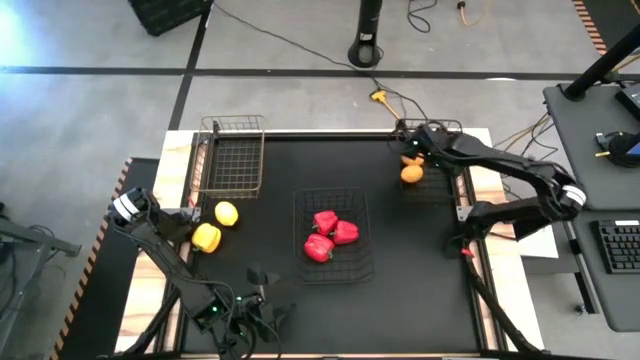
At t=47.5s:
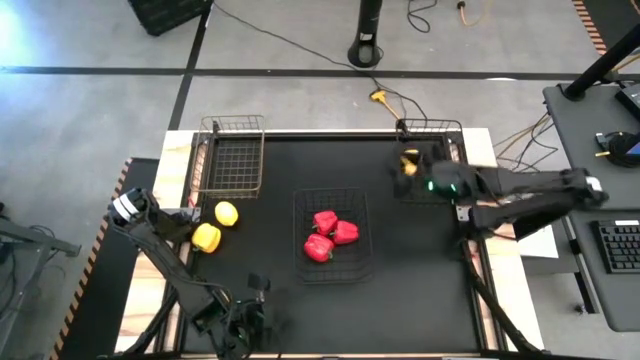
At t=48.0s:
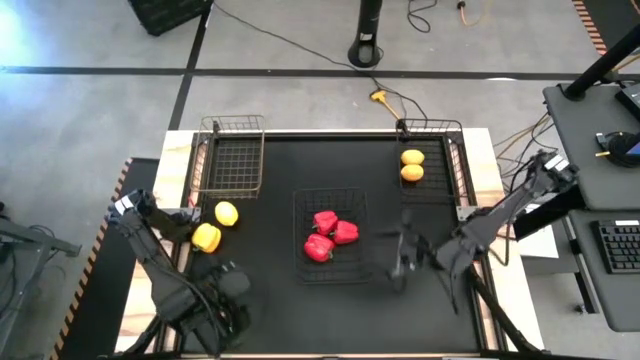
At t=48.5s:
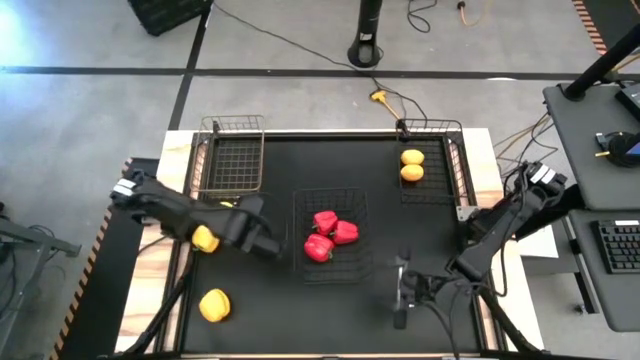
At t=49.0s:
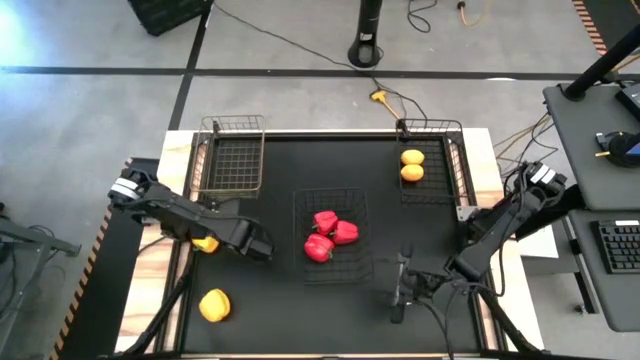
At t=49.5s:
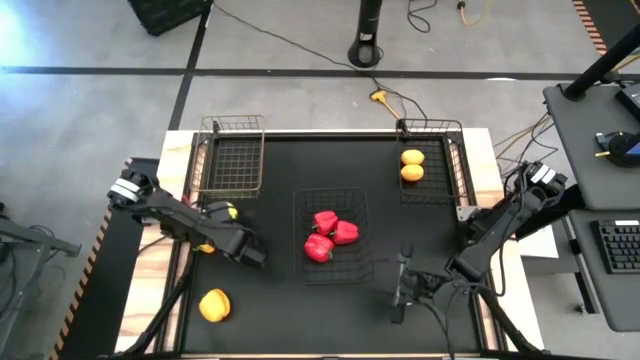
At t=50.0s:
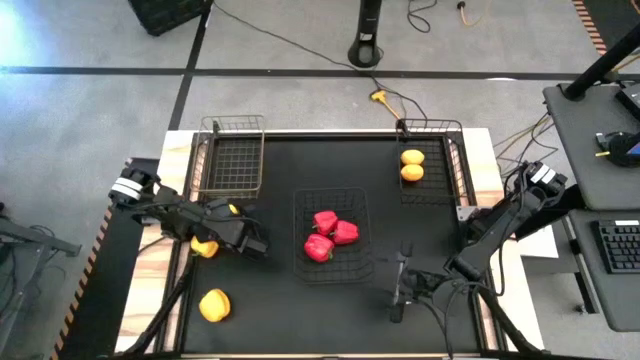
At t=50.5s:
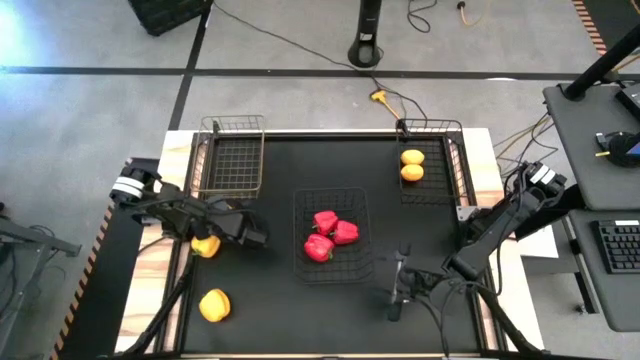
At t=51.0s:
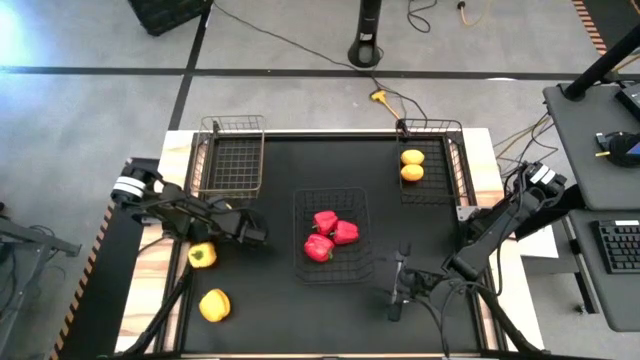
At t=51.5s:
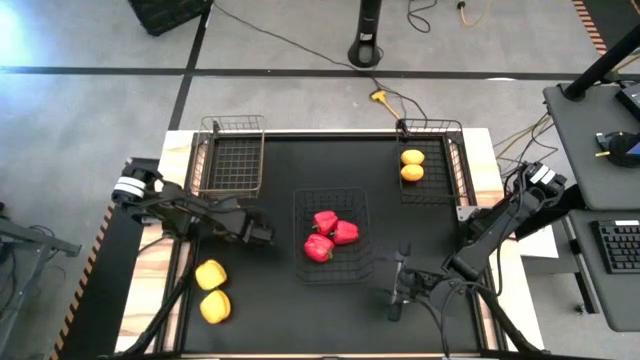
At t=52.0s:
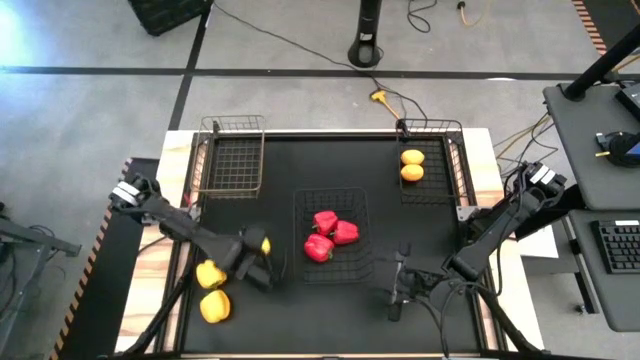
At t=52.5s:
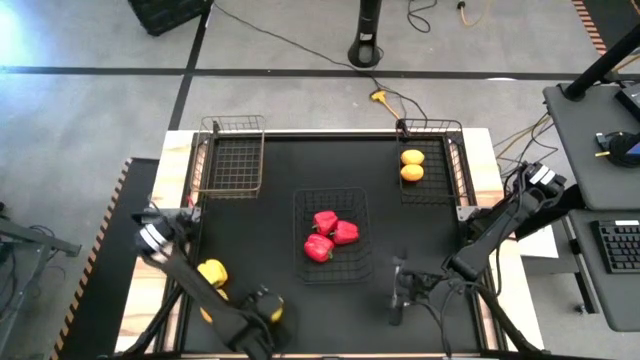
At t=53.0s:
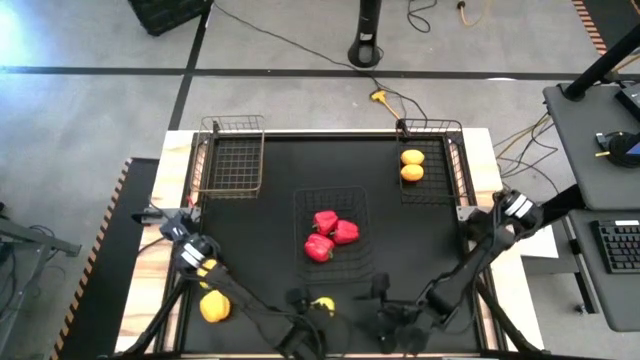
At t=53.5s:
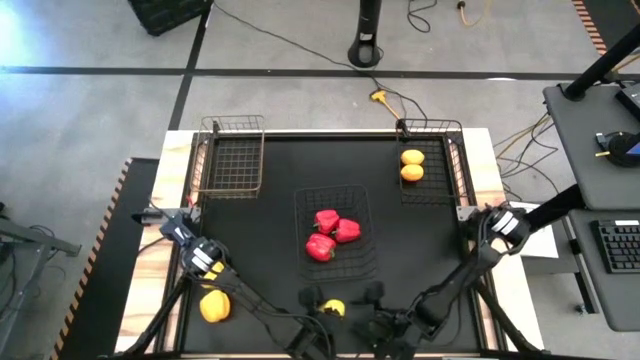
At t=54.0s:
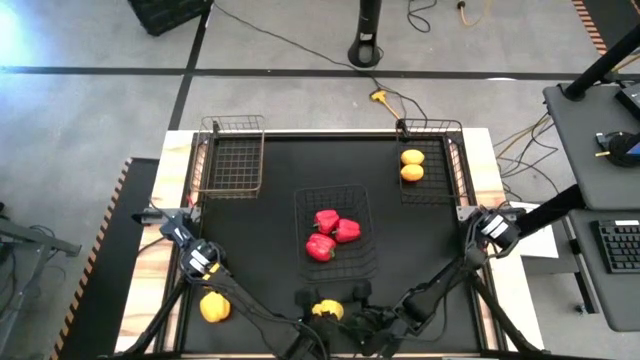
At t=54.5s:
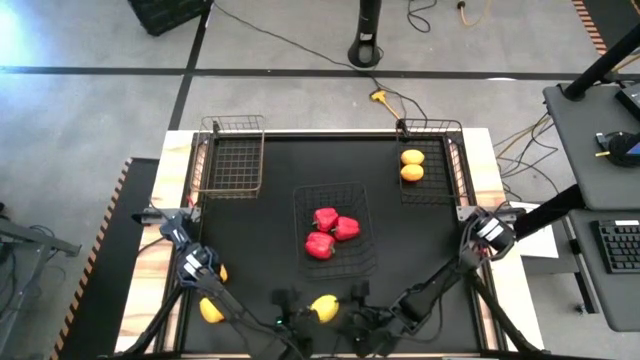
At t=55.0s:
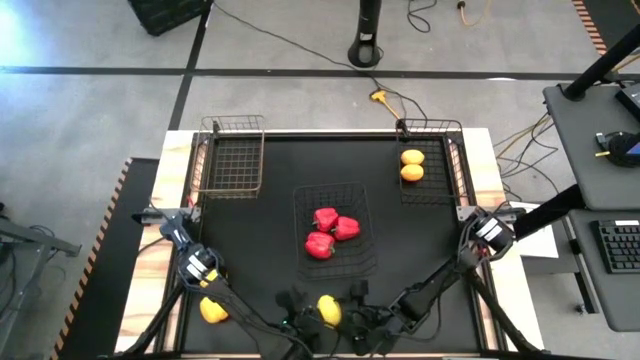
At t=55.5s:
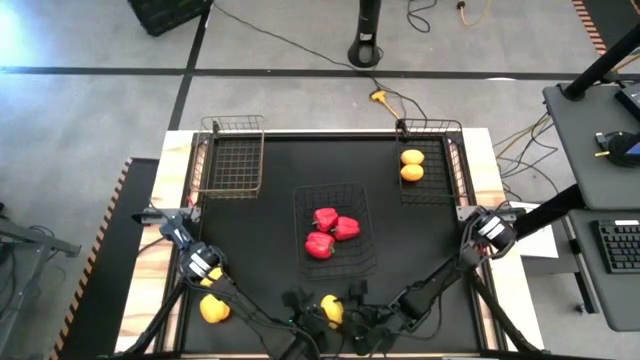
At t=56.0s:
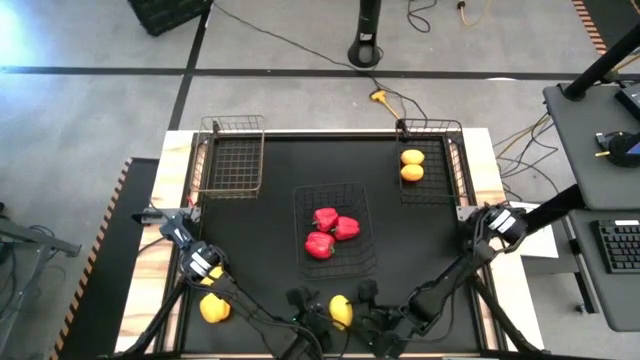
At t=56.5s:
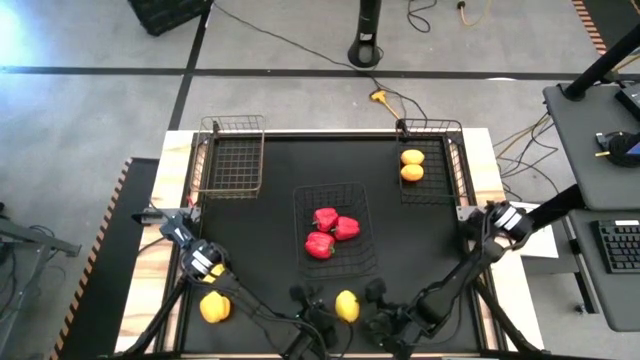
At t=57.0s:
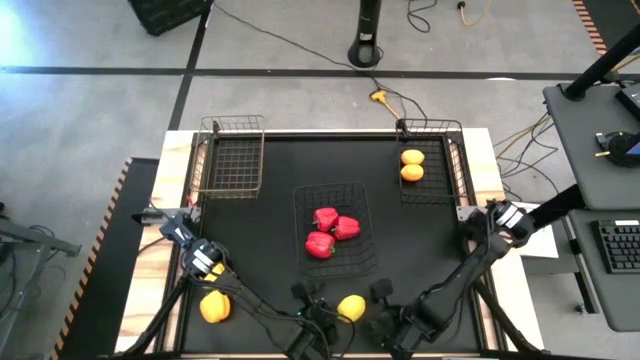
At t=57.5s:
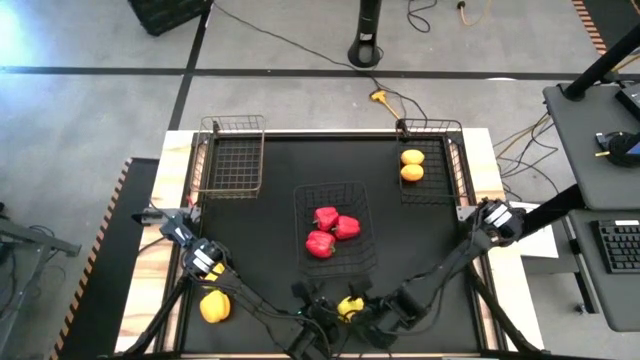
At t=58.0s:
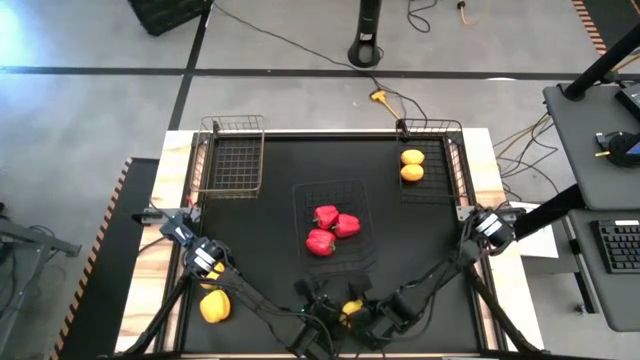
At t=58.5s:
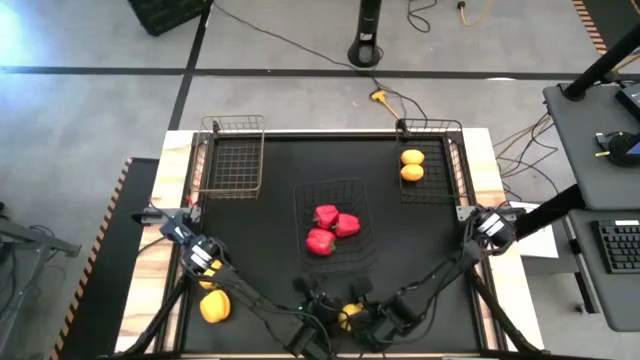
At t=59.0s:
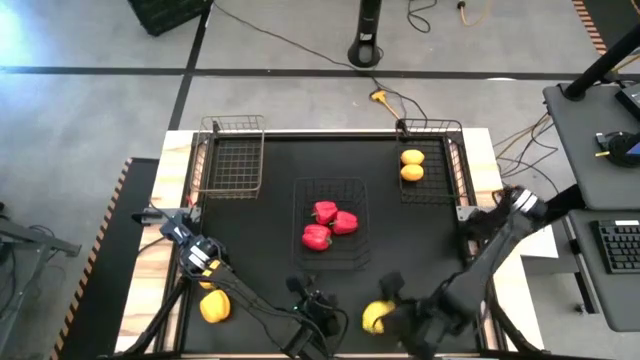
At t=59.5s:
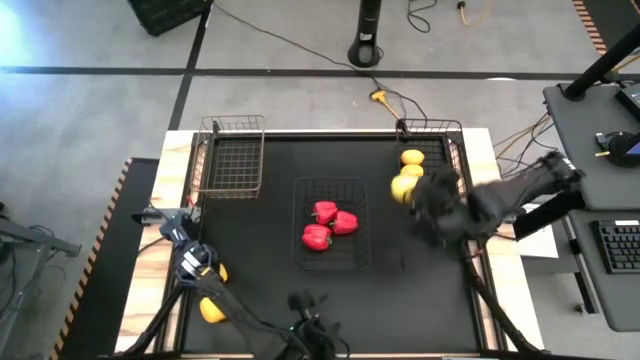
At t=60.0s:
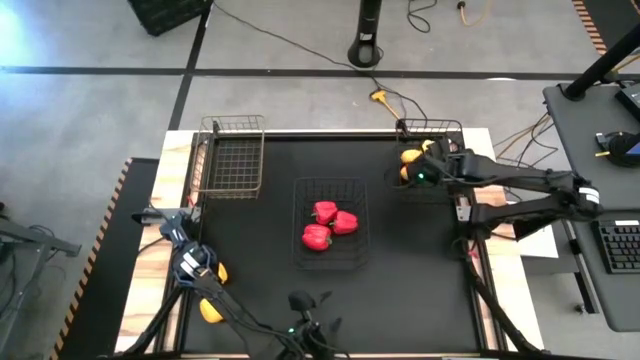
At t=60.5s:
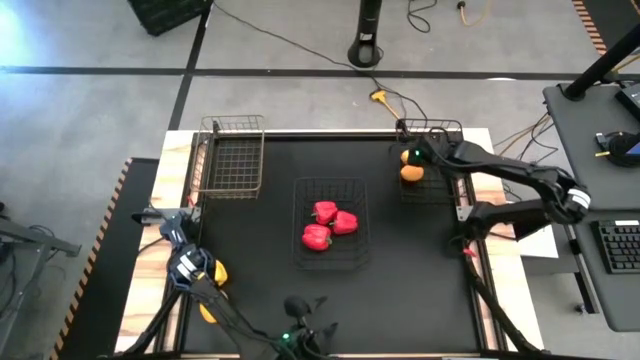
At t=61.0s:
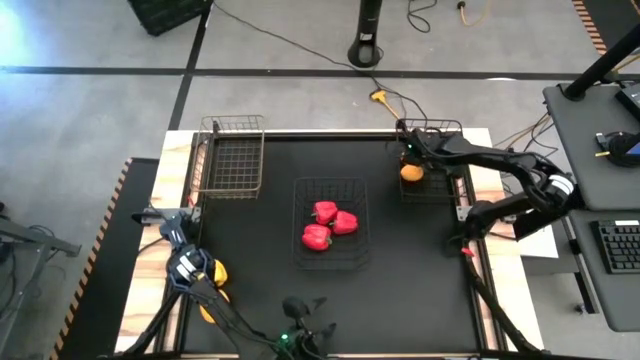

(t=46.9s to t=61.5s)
Task: Sort produce into baskets
Put the lemon into the right wire basket

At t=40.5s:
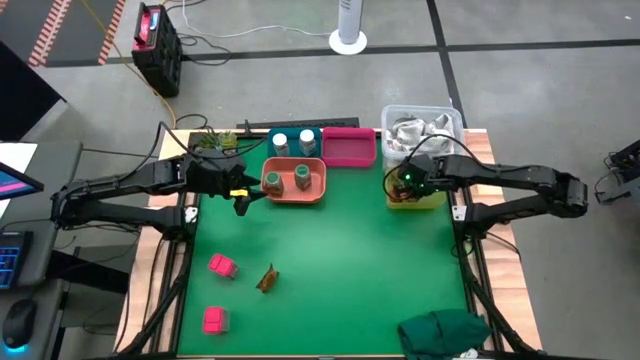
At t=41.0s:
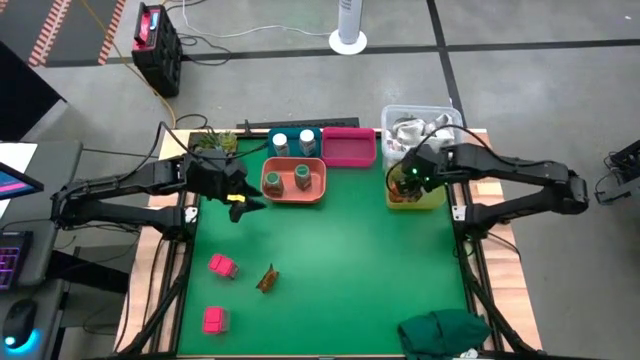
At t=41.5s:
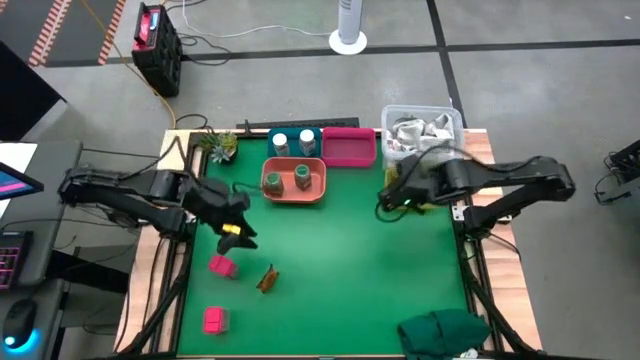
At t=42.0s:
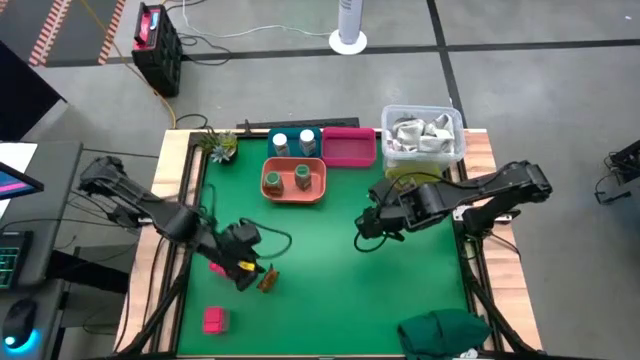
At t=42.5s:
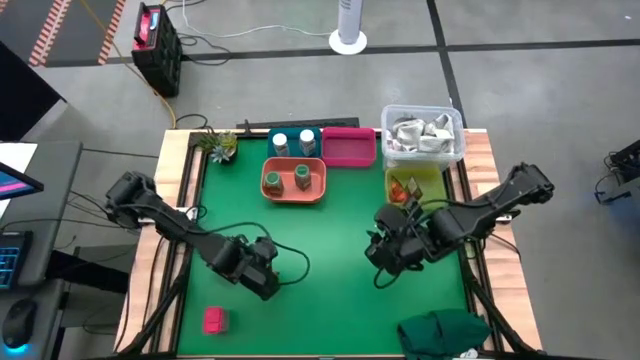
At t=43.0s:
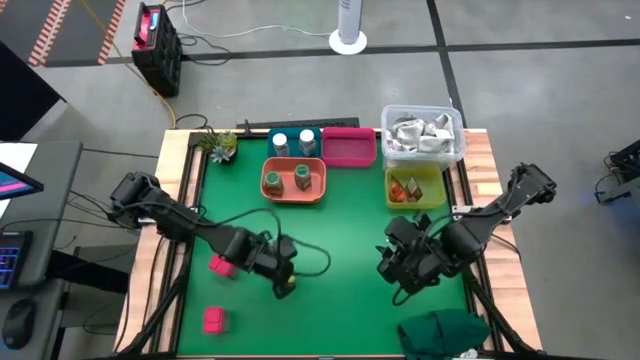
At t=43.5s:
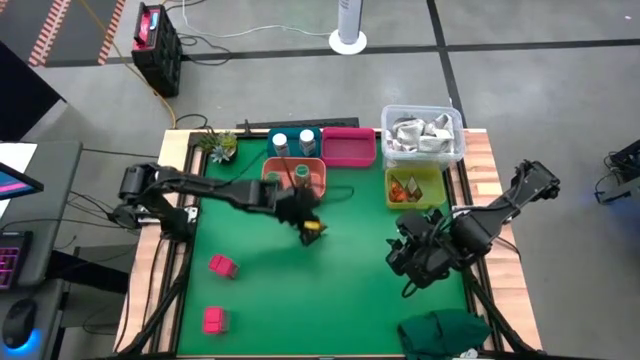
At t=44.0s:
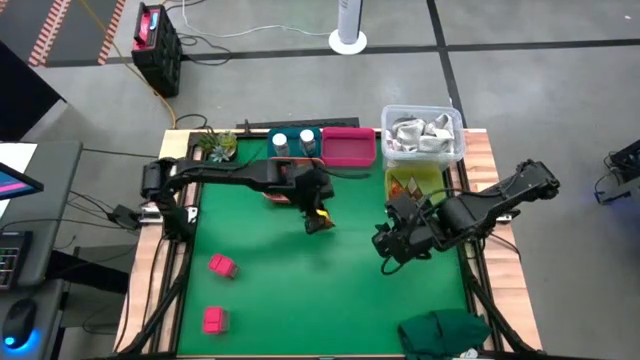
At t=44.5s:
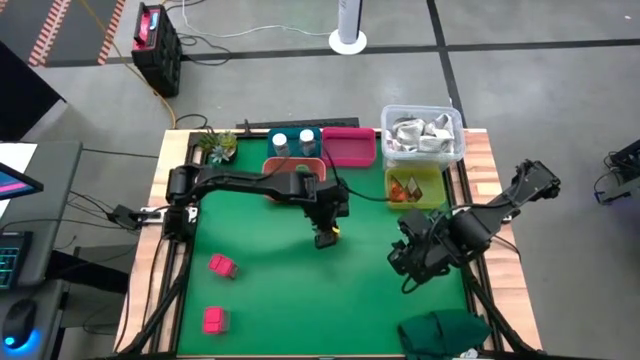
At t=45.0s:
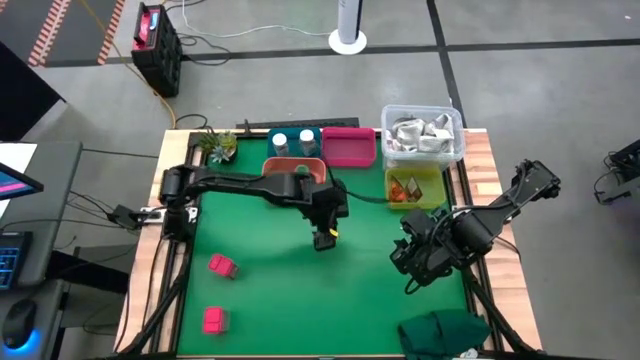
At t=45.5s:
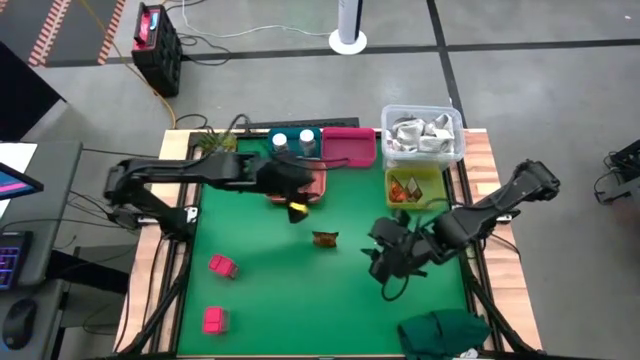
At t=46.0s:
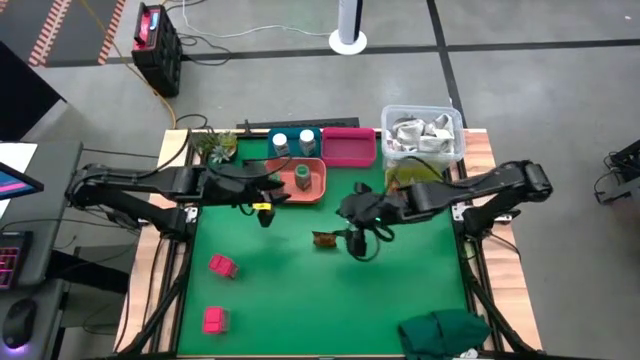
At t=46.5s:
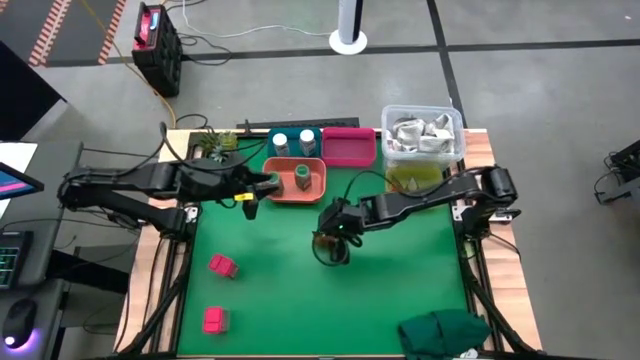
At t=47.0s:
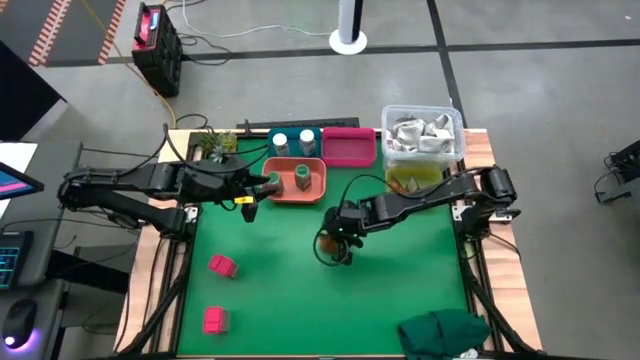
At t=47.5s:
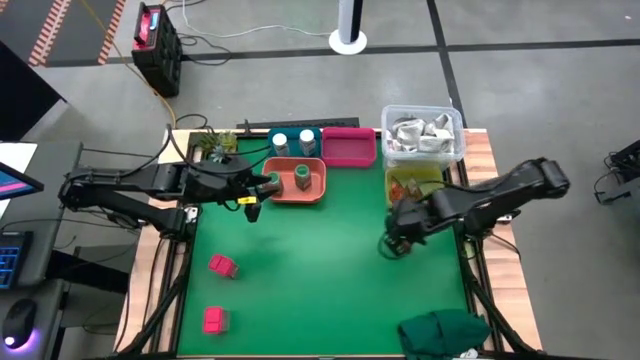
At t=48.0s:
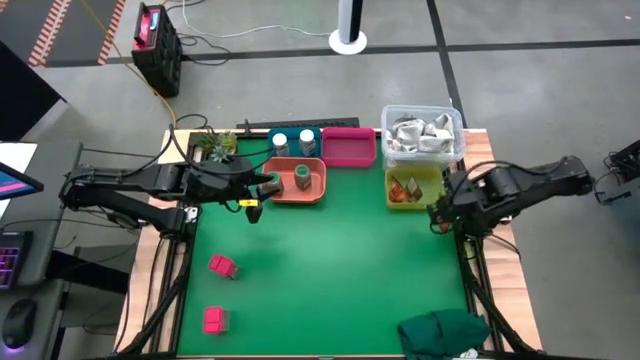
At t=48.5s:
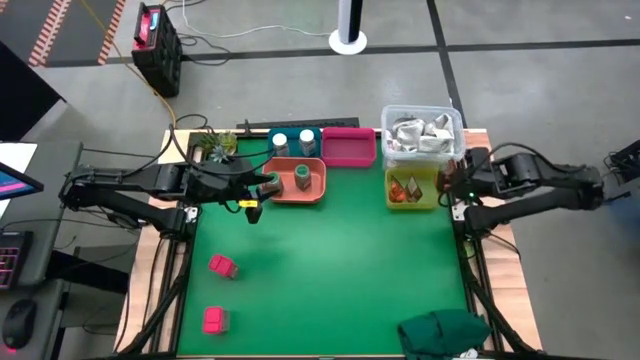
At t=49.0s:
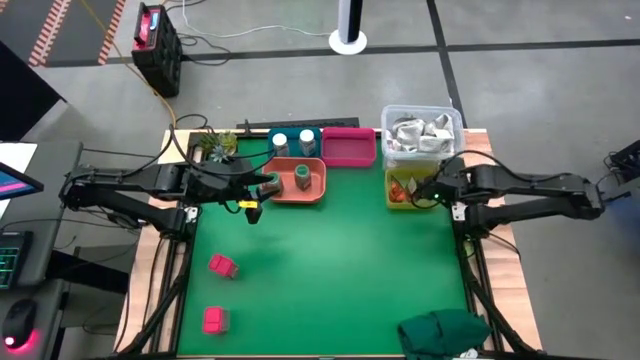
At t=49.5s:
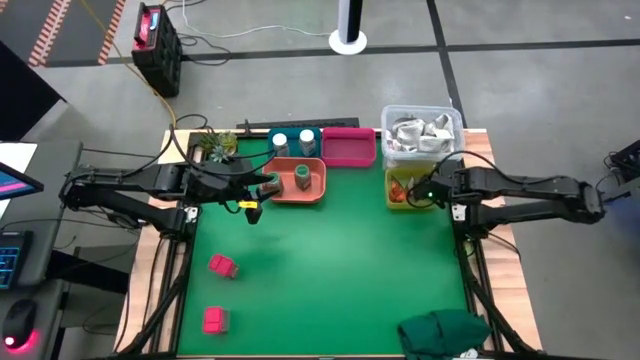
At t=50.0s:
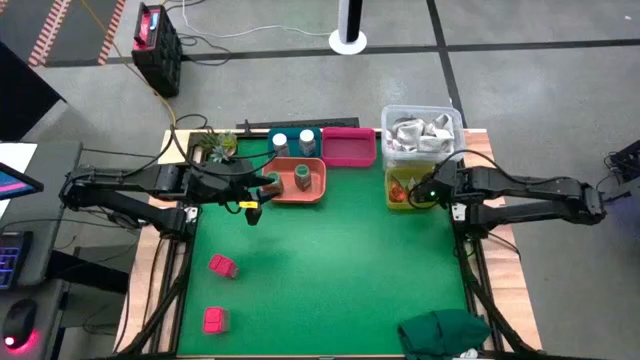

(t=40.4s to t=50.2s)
Task: Sort spices by type
Put the orange seasoning pack into the yellow bin
